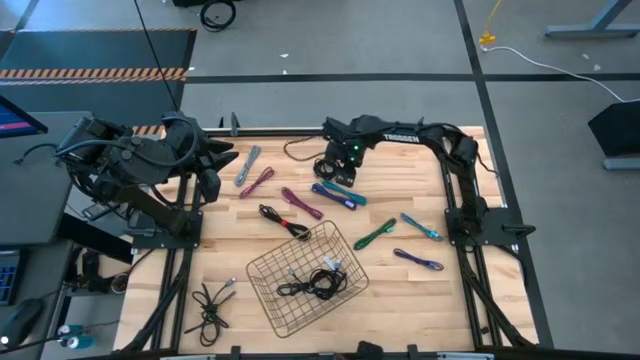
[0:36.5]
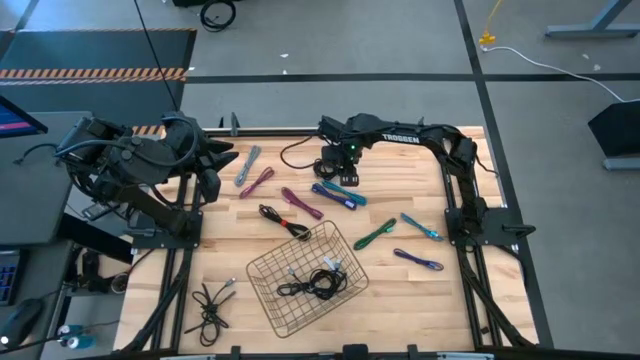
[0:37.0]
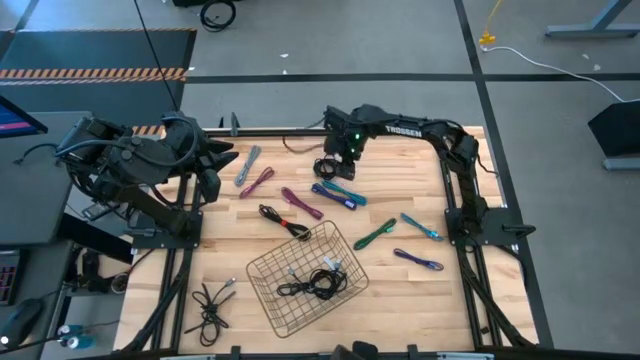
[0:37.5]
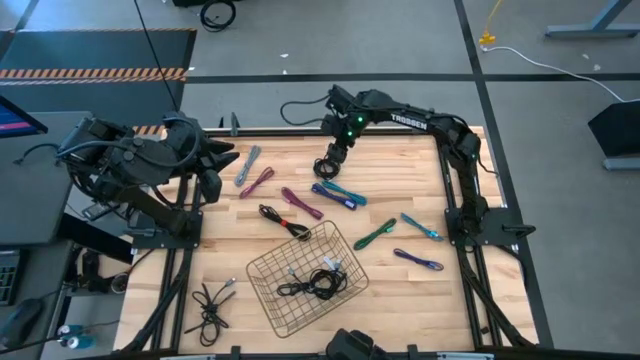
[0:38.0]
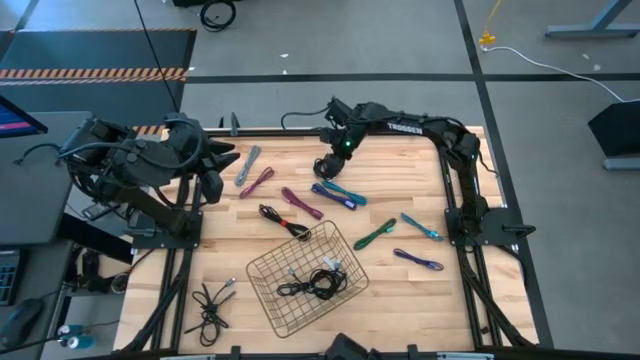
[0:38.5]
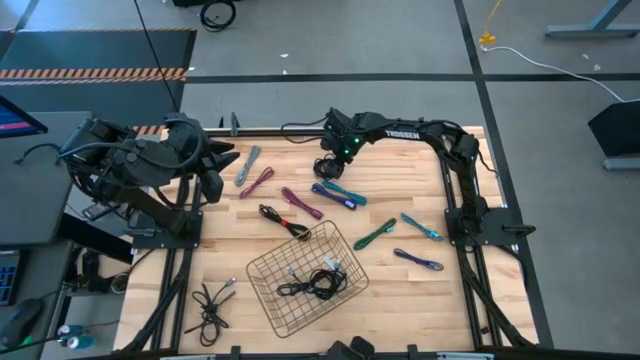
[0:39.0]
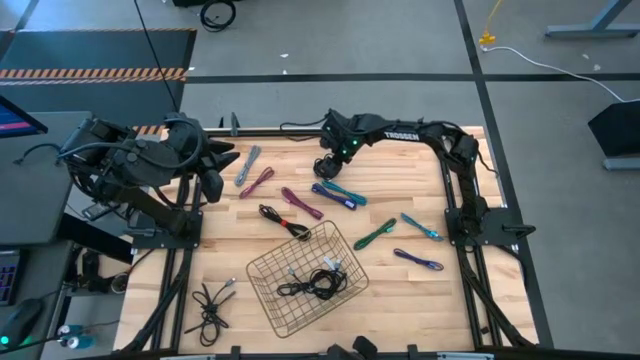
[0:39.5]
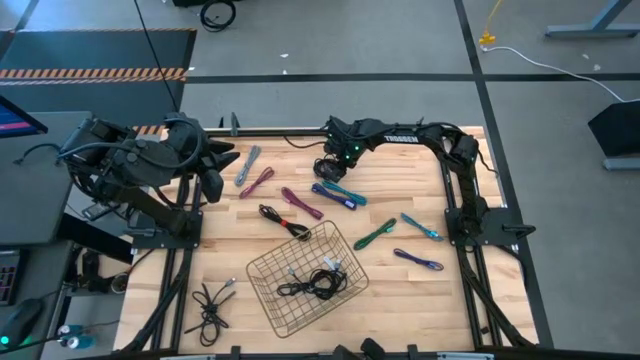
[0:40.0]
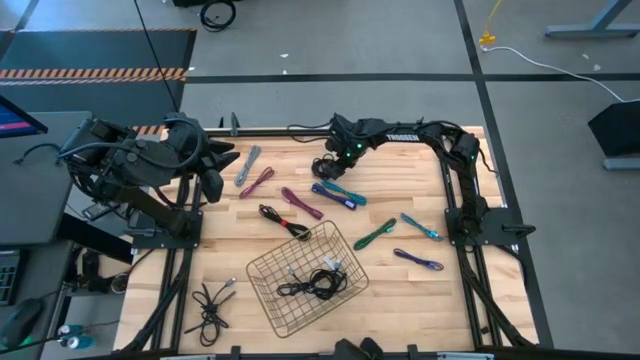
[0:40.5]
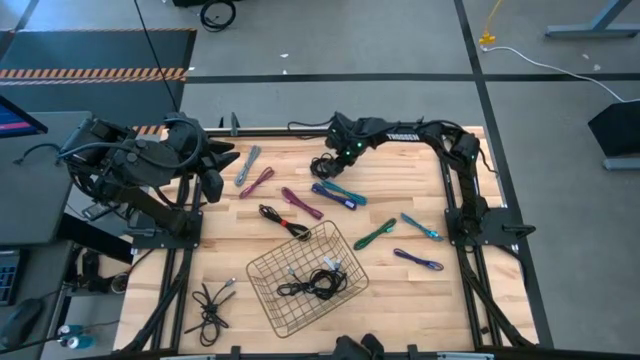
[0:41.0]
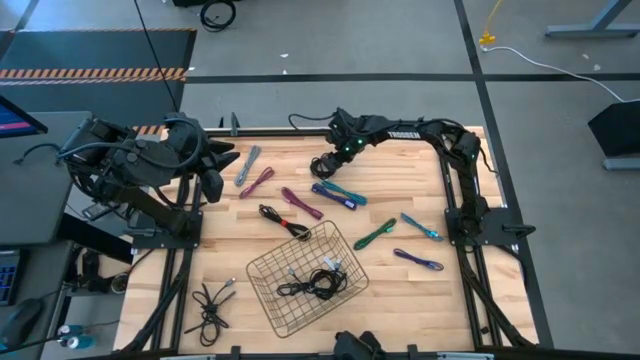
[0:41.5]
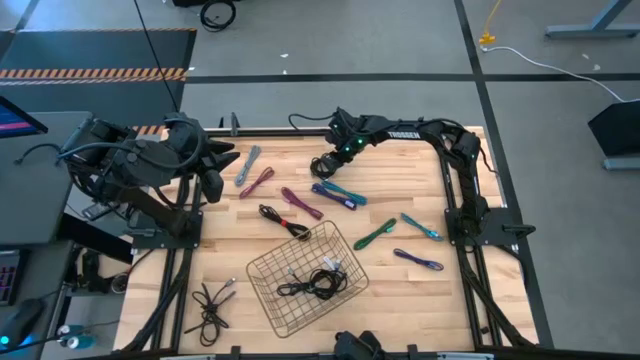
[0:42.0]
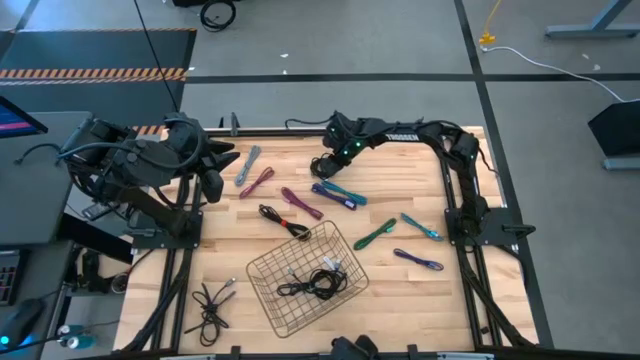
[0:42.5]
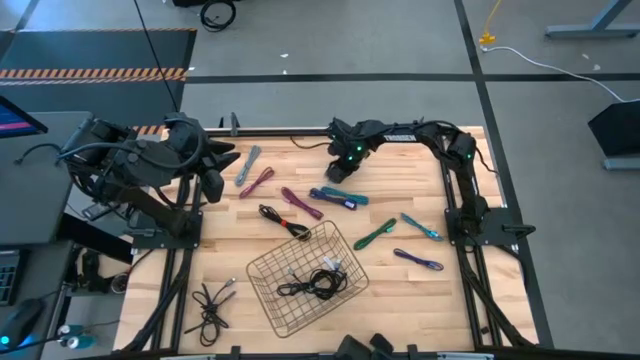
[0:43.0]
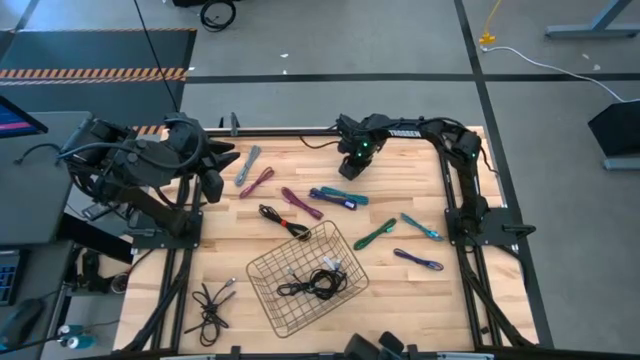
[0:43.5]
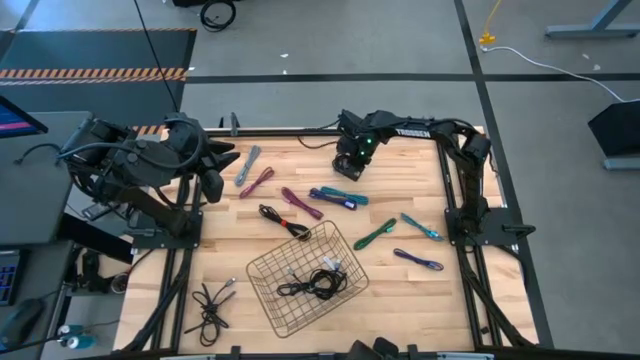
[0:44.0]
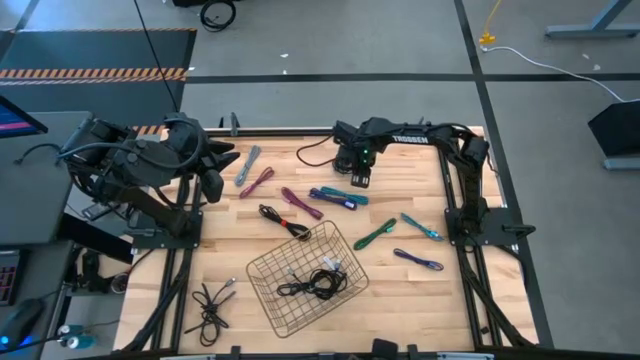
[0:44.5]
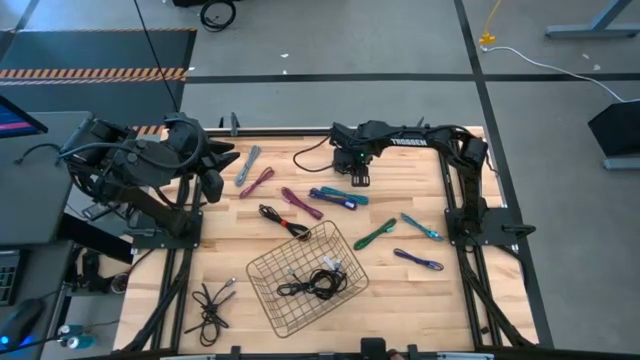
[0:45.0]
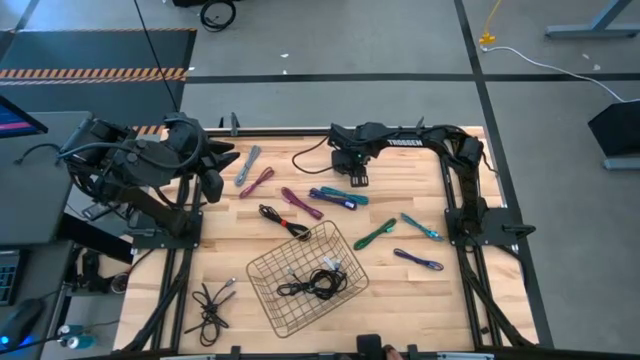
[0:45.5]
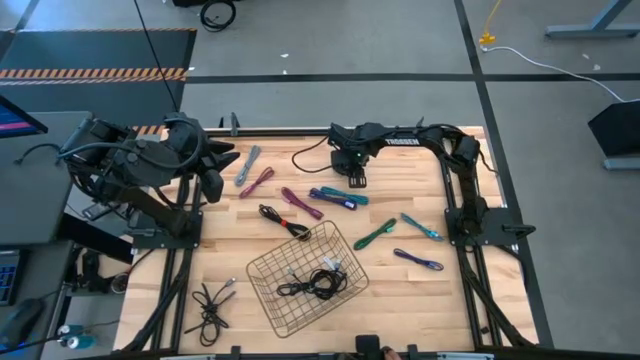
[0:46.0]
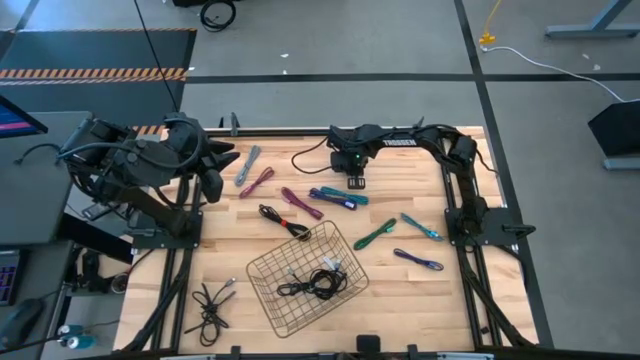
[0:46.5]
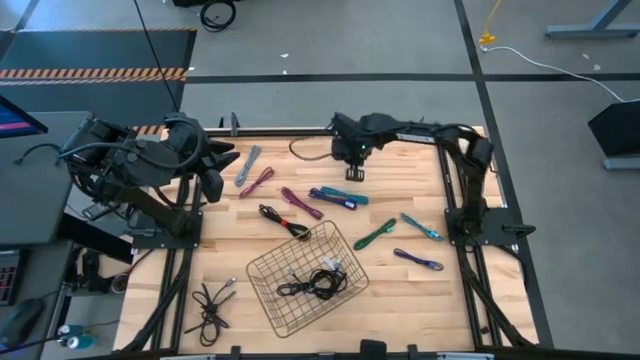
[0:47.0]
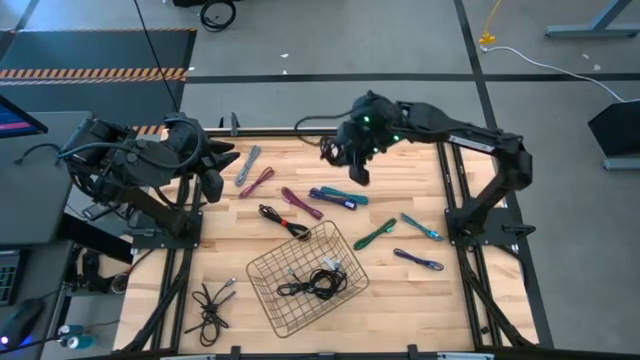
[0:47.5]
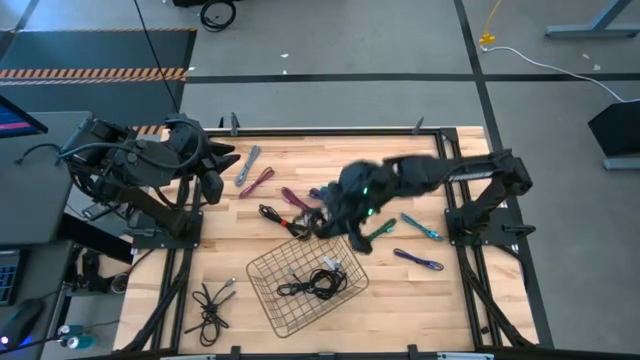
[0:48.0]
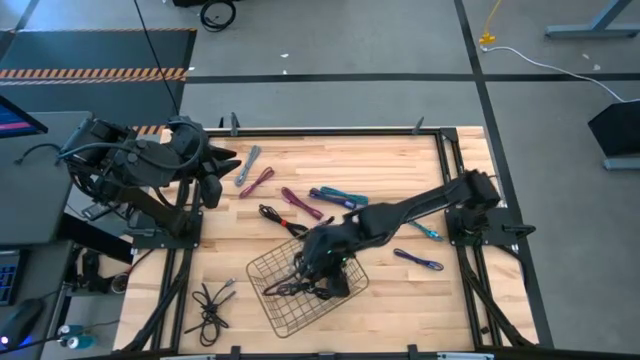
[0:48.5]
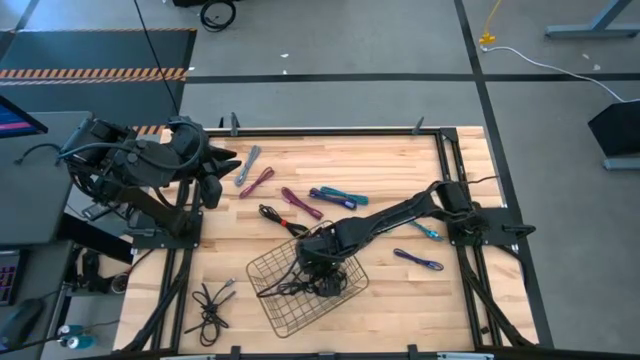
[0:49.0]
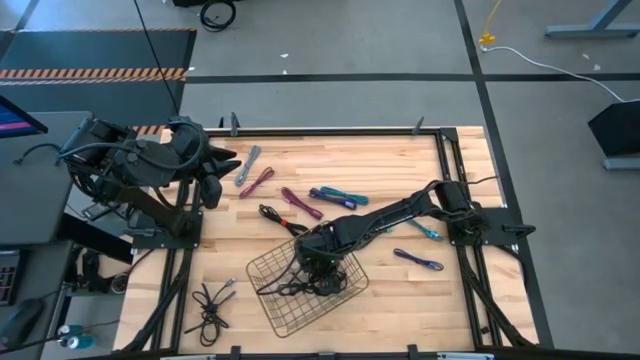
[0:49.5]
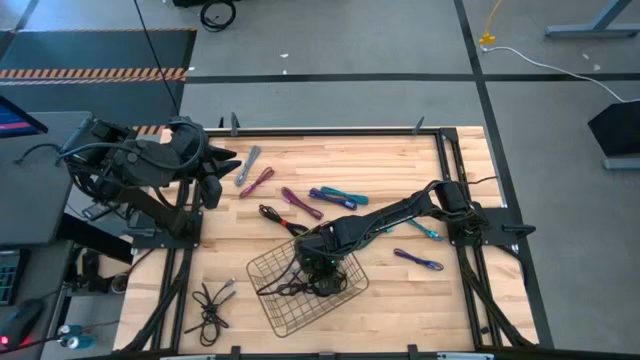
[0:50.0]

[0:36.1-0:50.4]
Task: Pick and place USB-C Cables
Put the black charger cable into the wire basket
